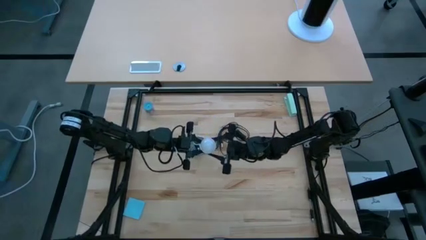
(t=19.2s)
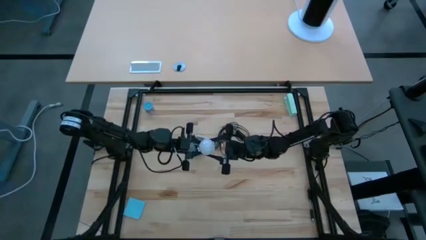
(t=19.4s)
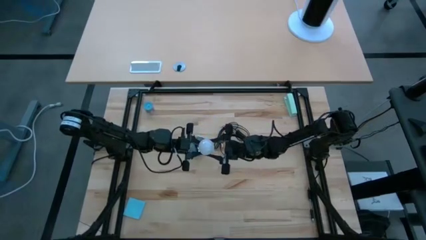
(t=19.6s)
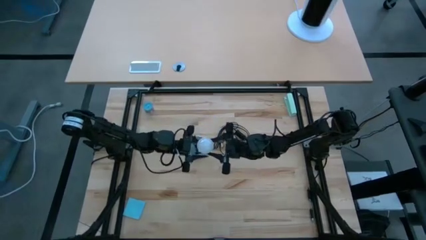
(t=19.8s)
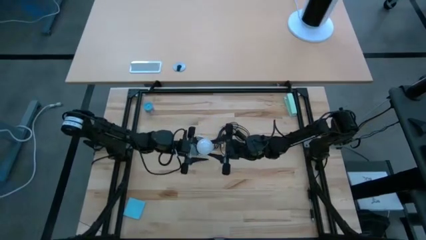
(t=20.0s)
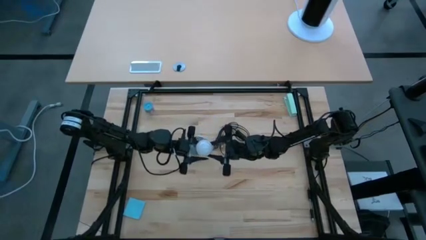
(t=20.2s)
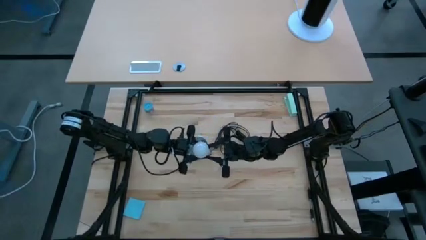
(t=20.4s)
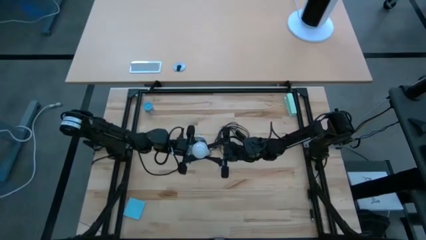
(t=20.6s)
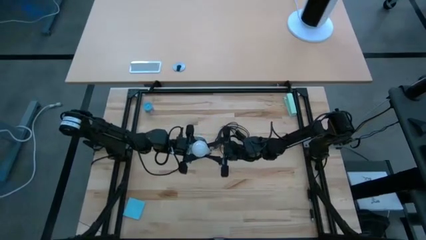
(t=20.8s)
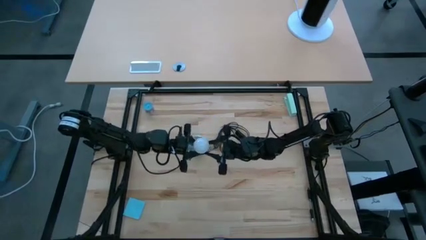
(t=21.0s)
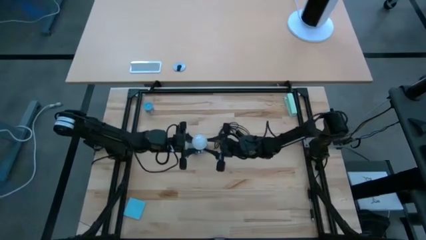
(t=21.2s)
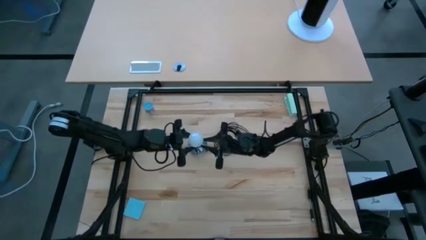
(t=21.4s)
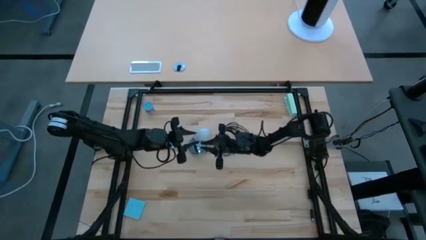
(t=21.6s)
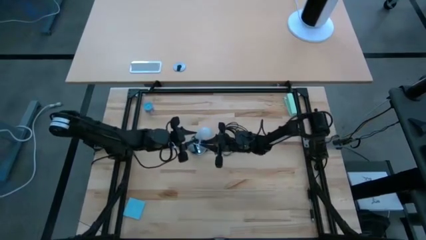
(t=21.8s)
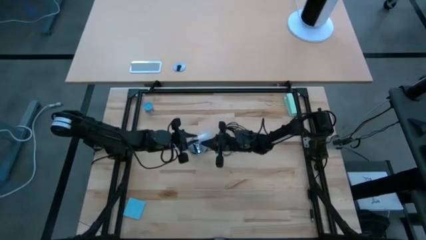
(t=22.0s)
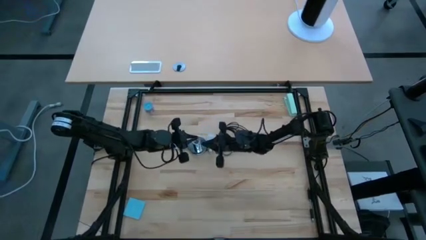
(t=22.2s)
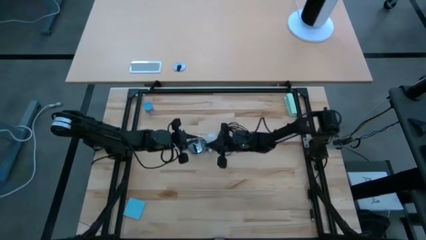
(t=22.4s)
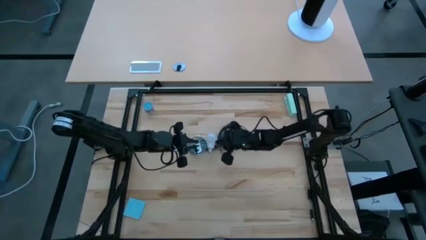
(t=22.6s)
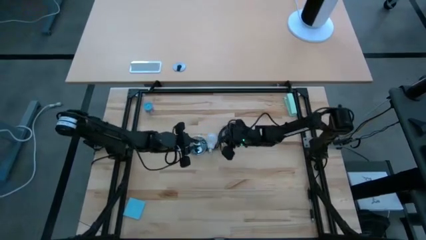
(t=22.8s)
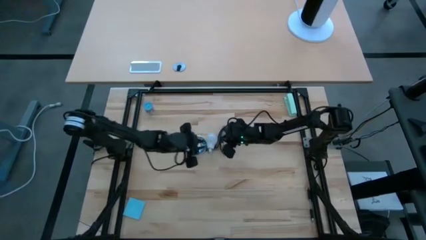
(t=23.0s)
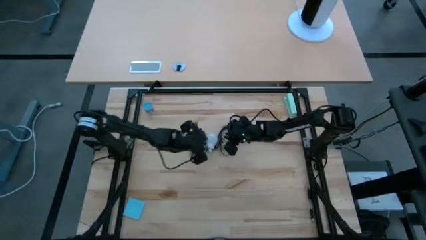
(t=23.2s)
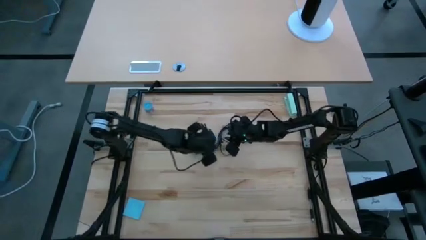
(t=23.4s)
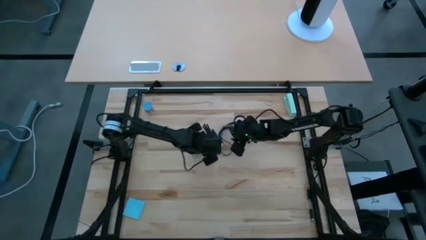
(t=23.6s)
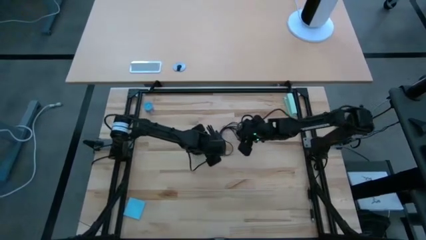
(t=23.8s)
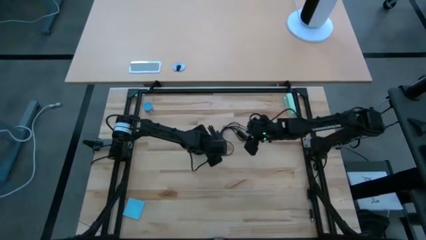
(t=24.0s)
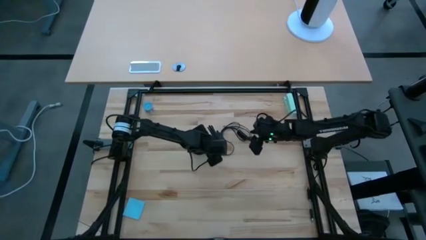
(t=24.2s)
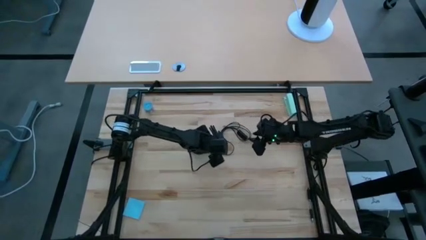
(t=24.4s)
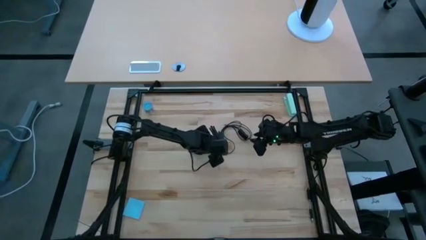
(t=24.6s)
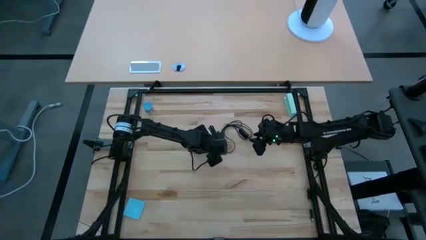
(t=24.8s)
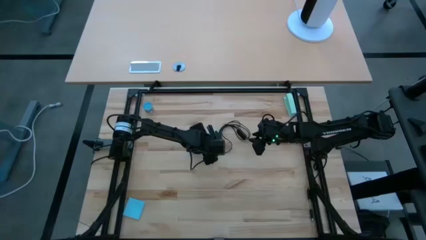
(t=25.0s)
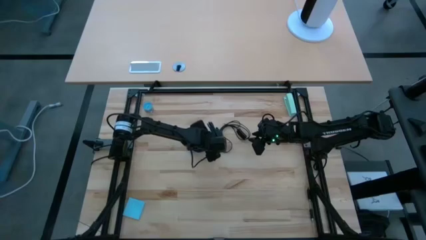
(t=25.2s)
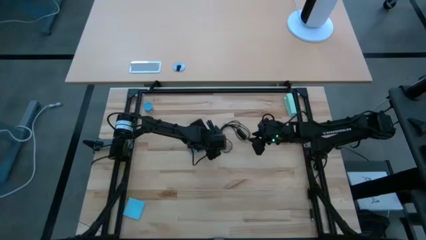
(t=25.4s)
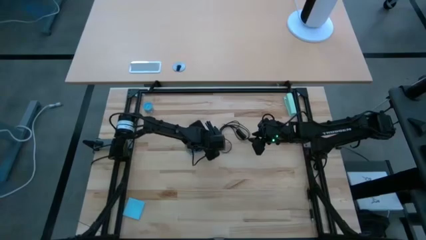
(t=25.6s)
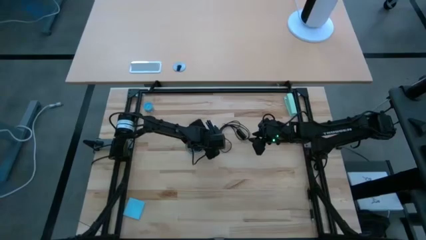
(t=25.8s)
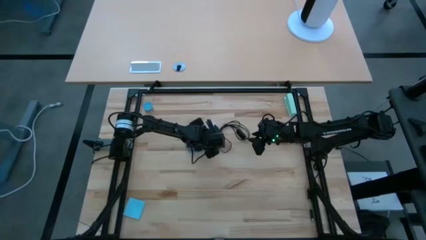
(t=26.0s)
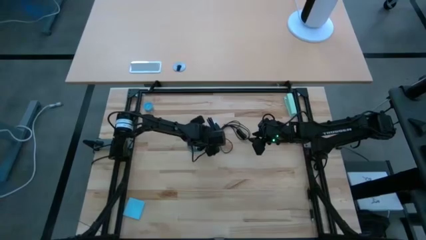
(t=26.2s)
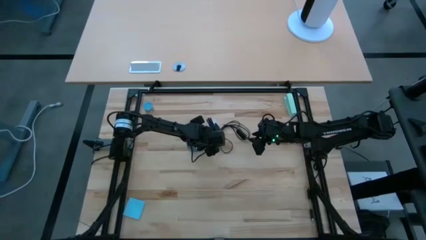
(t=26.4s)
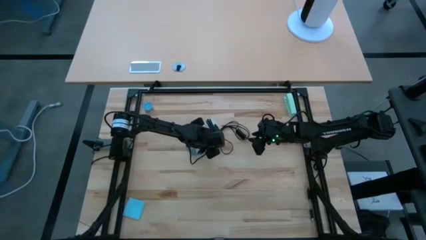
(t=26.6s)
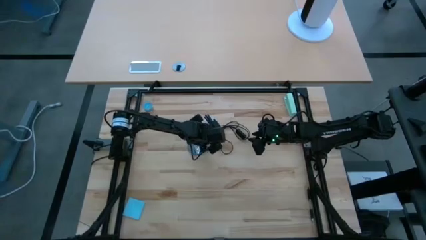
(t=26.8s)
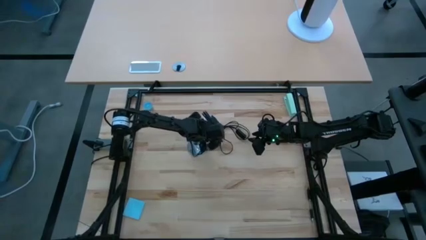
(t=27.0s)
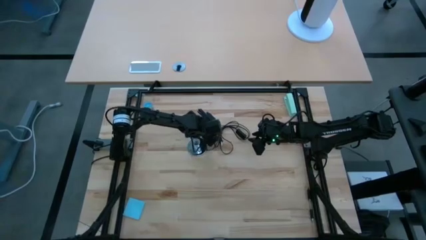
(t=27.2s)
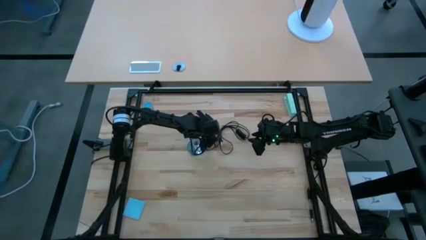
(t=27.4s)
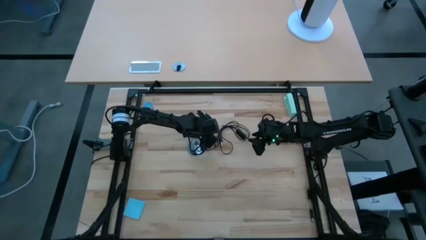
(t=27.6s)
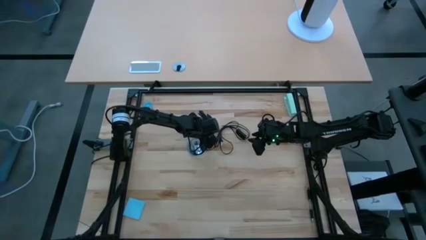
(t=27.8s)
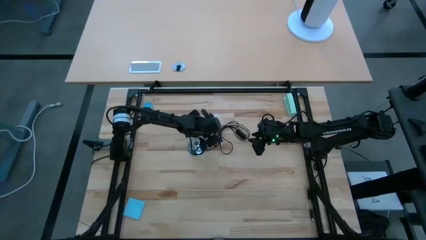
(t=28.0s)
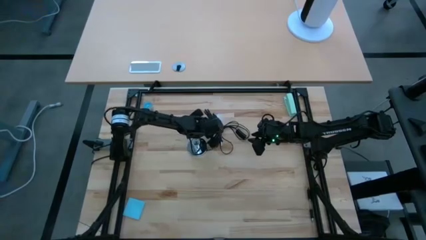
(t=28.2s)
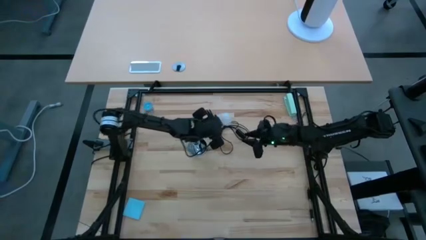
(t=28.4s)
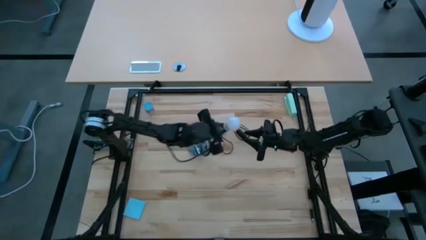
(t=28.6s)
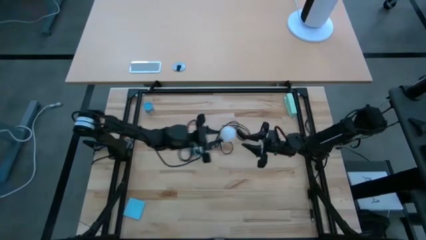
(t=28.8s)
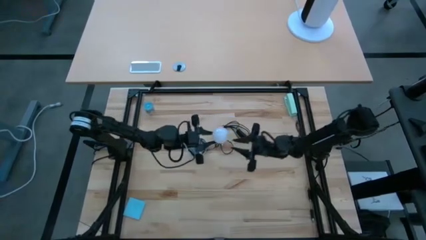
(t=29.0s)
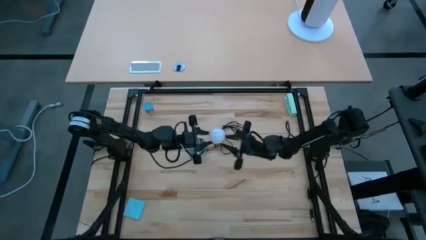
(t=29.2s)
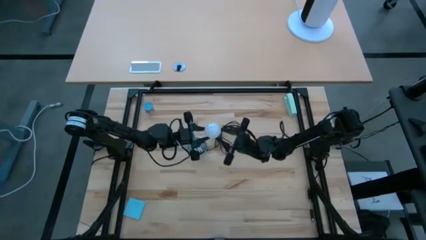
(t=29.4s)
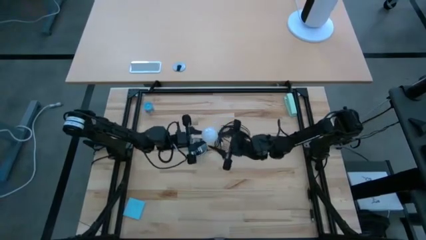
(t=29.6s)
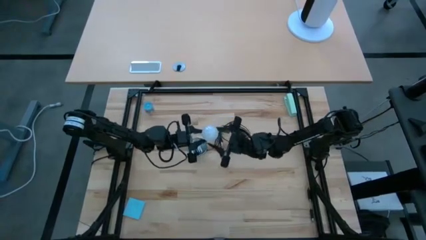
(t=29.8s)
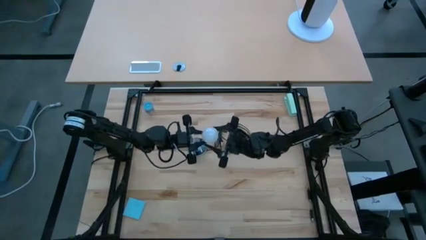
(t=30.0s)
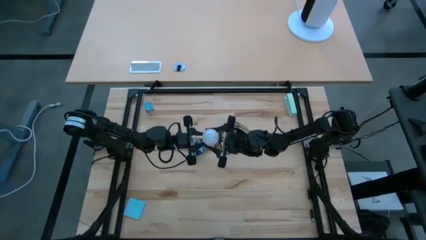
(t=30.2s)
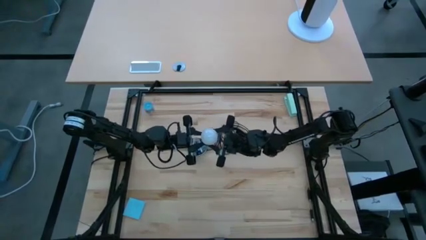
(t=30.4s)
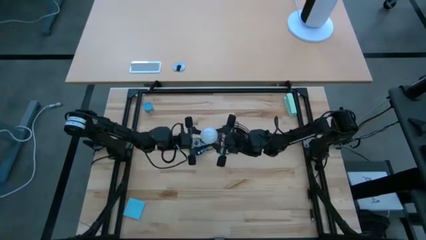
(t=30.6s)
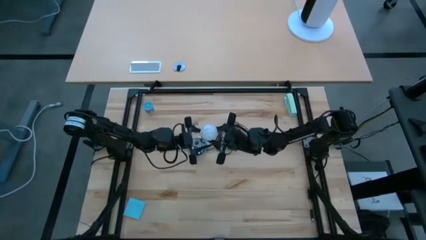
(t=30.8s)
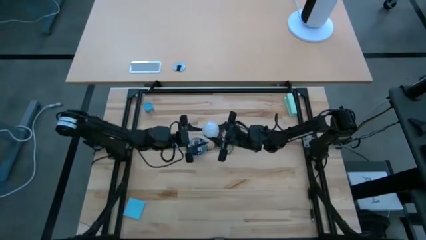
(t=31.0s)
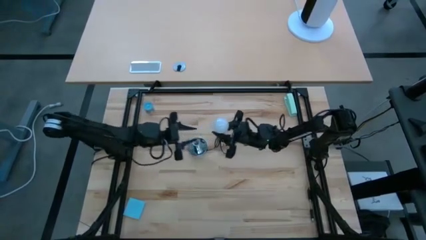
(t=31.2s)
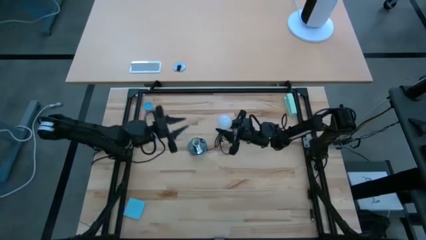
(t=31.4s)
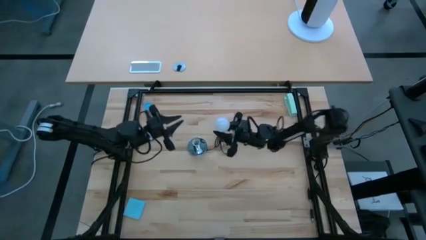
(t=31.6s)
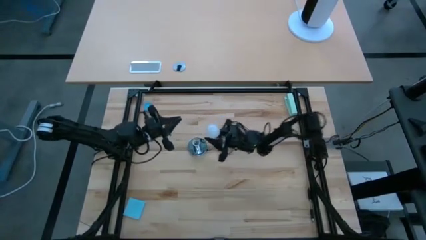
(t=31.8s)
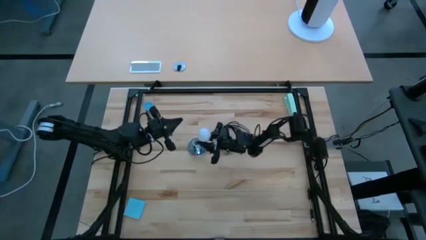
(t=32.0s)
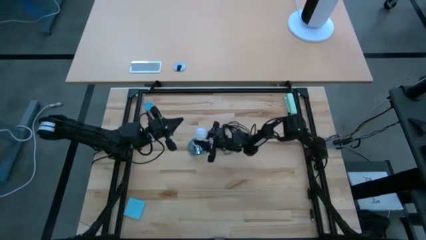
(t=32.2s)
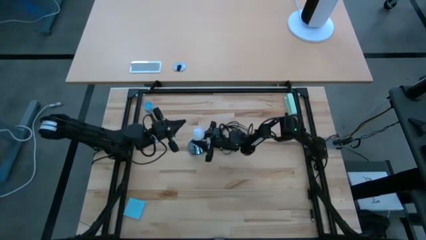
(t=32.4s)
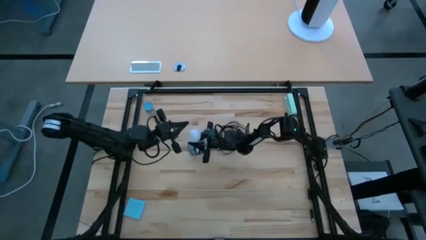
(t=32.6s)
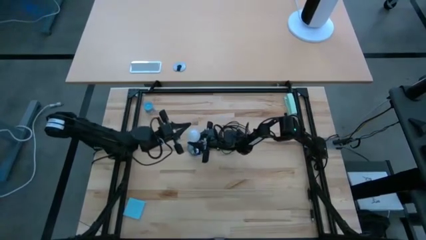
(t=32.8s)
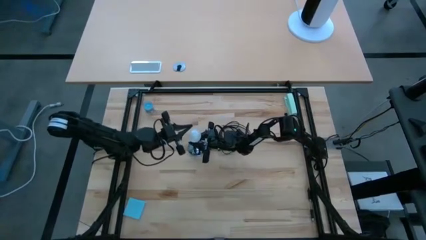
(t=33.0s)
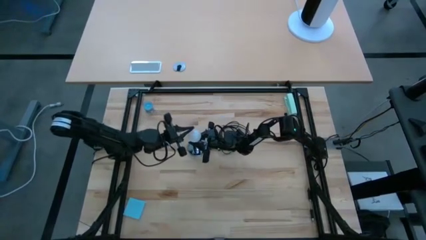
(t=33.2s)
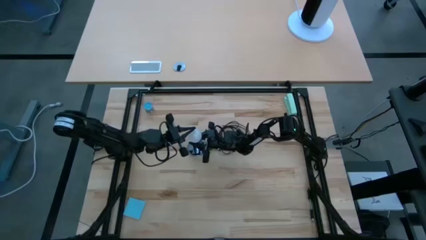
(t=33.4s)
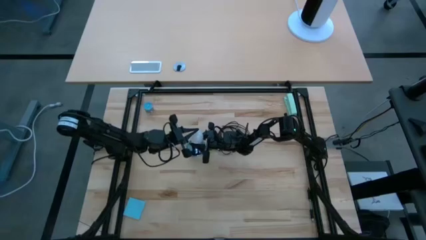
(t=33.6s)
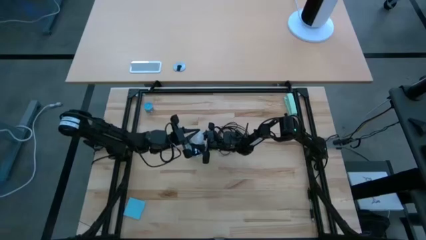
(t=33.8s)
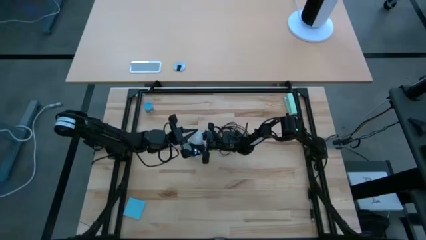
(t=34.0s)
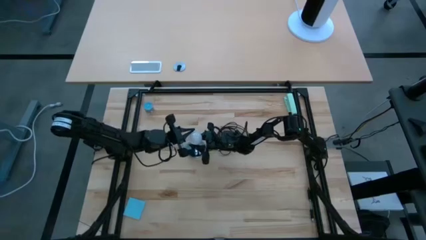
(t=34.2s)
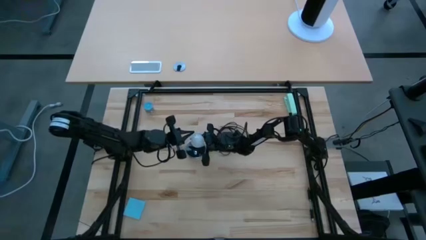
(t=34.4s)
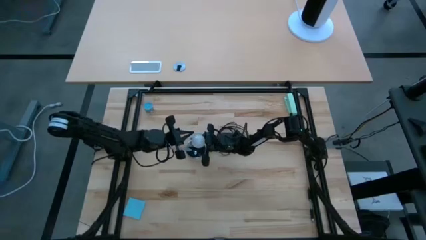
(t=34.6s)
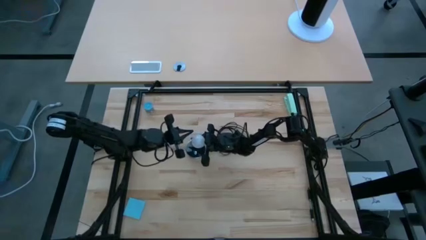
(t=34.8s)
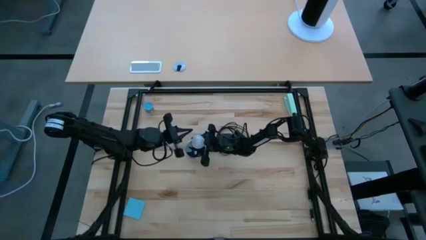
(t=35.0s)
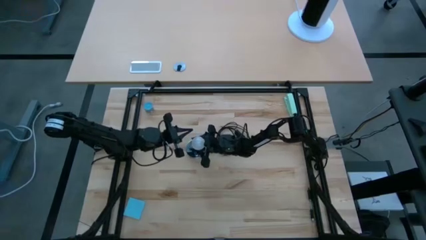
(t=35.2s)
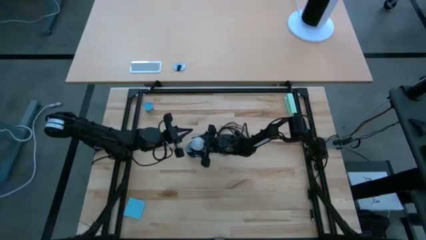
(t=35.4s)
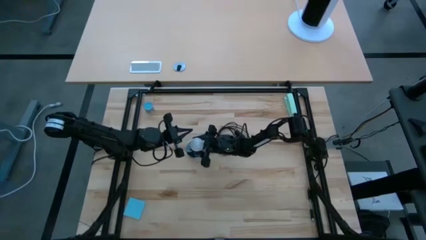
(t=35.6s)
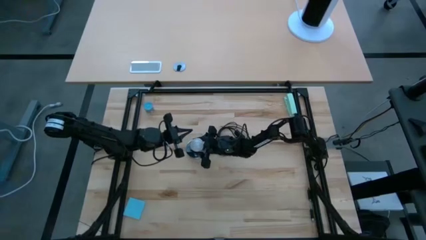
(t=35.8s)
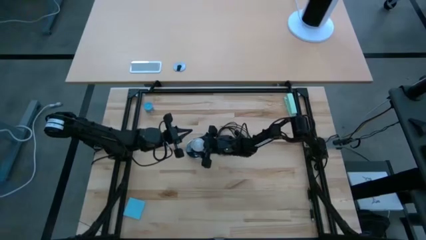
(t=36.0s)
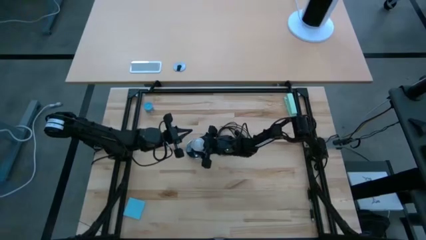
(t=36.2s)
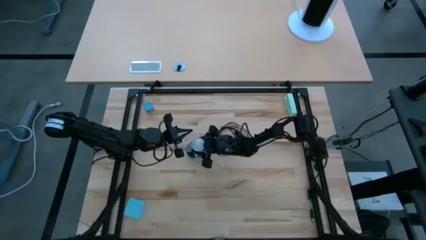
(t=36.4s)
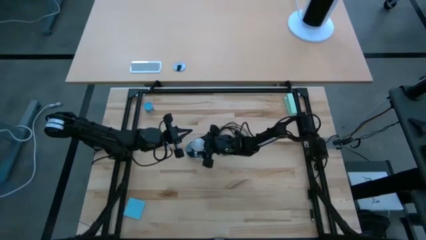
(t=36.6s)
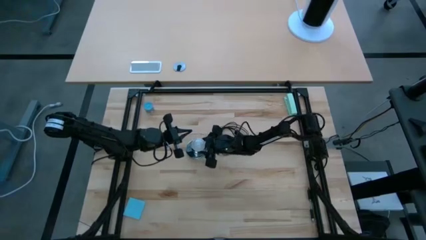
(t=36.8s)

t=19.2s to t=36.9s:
Task: Screw lightbulb
Insert the lightbulb into the lamp
